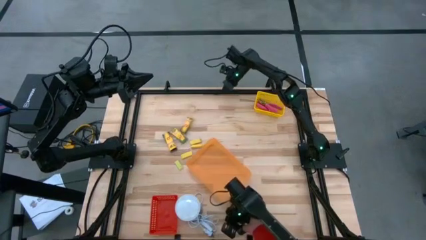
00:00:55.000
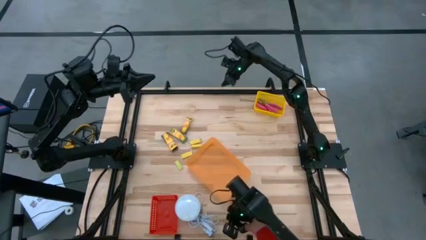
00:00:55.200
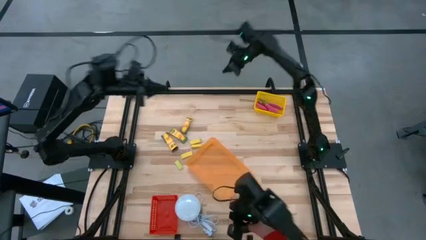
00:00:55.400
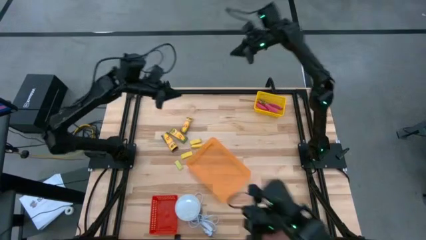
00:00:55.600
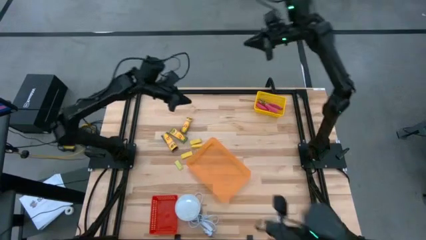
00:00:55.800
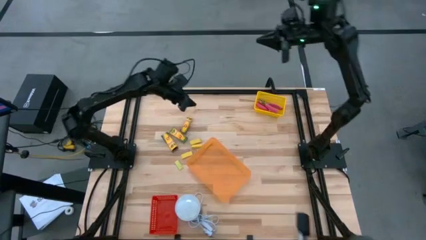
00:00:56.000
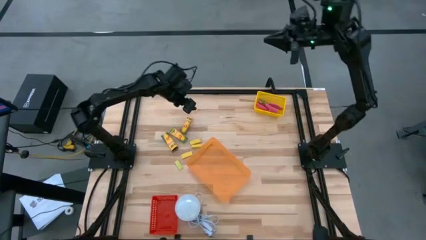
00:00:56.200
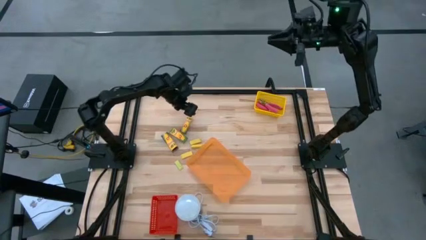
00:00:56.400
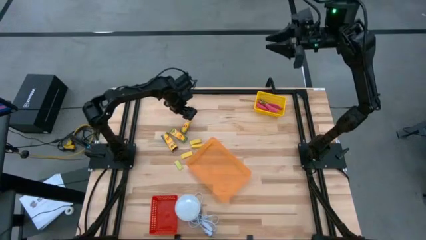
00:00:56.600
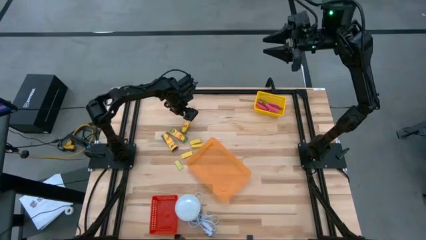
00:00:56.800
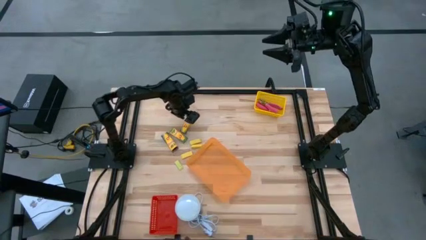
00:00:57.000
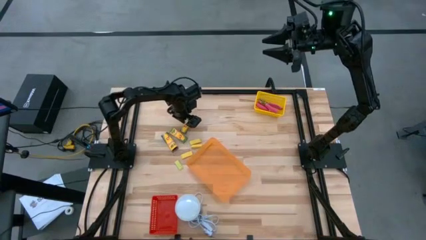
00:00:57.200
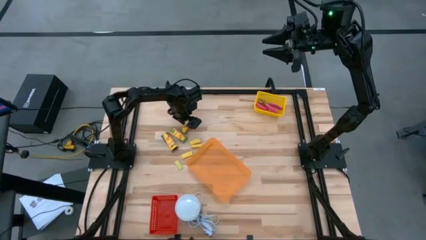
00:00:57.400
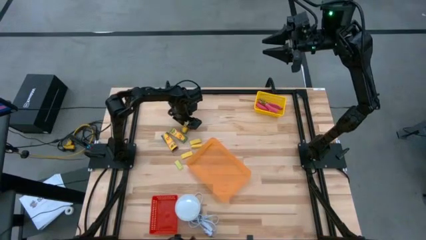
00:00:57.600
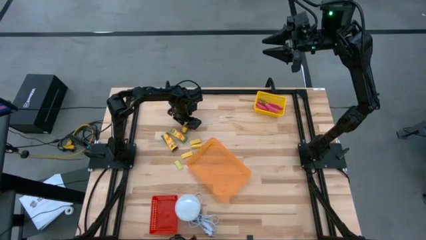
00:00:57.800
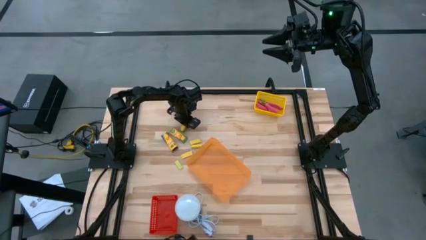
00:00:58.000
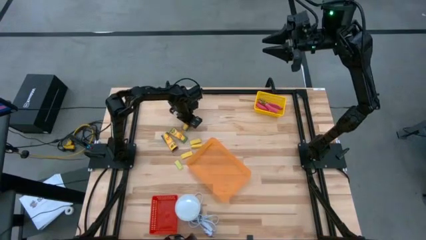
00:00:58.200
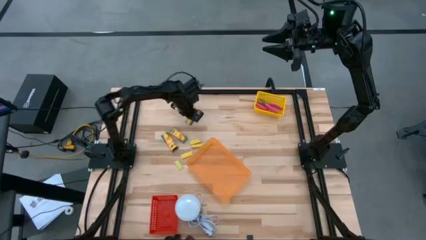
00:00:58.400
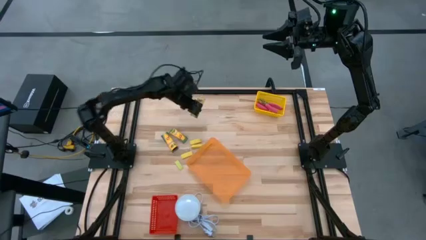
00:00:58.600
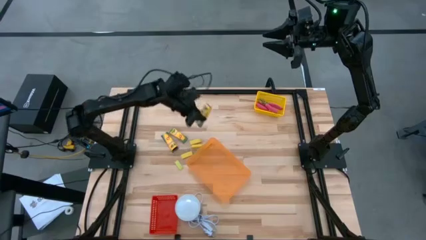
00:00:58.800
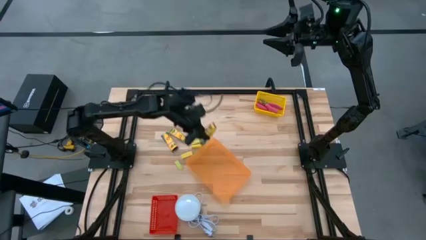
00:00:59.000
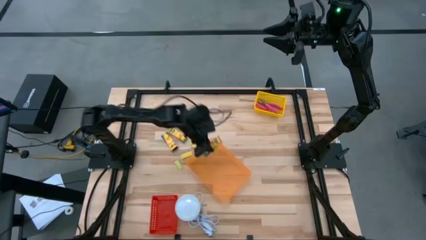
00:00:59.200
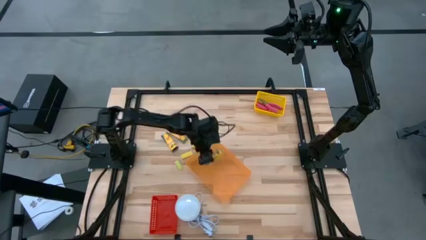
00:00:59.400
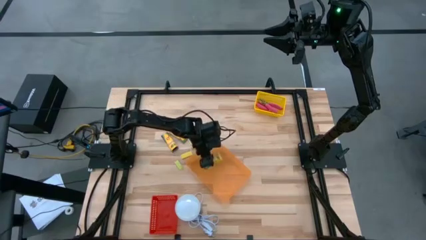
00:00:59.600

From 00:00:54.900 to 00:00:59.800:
Task: Pick & Place School Supplies
Put the crayon pack into the orange bin

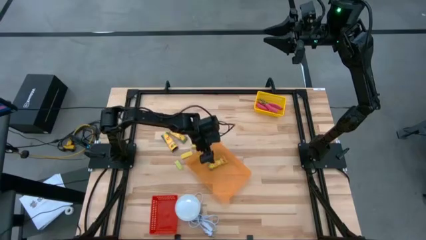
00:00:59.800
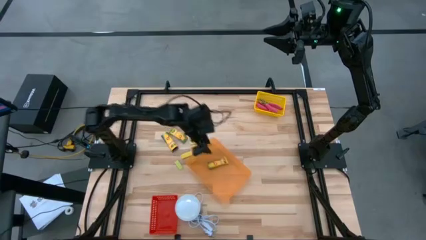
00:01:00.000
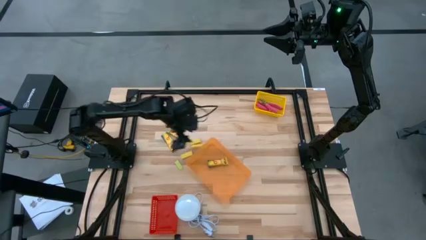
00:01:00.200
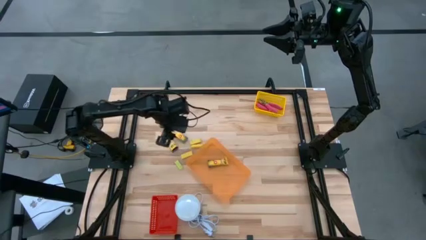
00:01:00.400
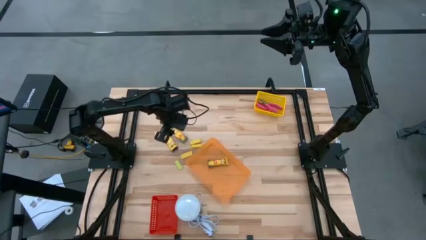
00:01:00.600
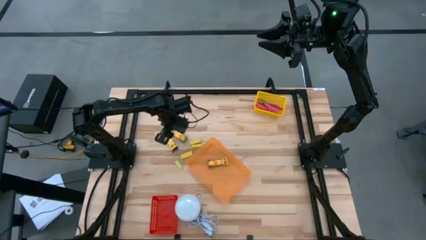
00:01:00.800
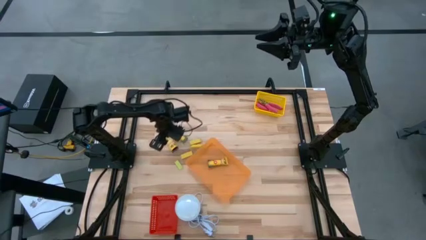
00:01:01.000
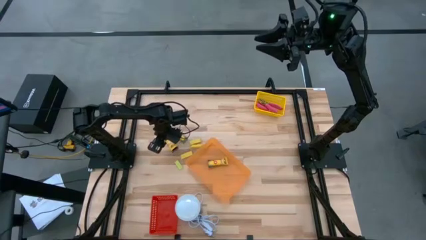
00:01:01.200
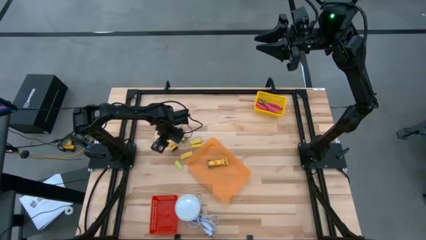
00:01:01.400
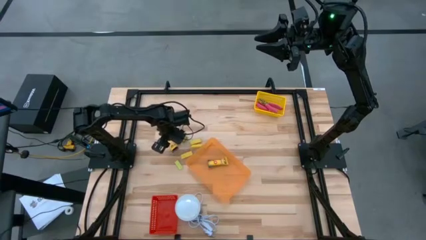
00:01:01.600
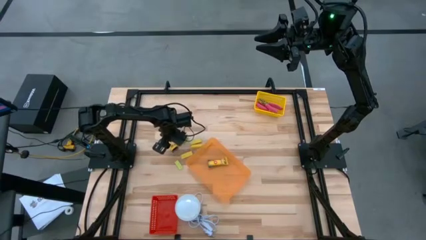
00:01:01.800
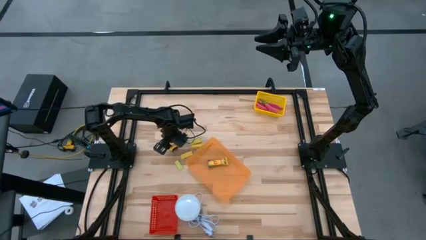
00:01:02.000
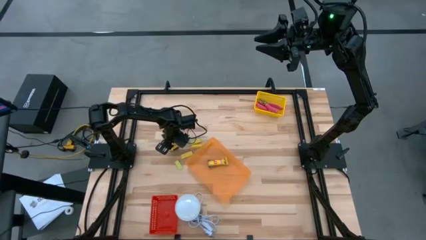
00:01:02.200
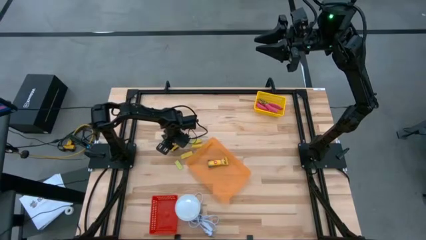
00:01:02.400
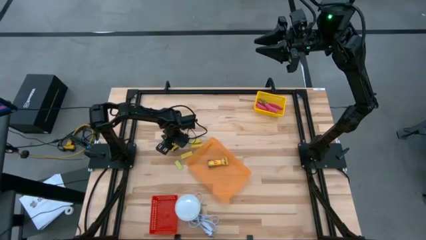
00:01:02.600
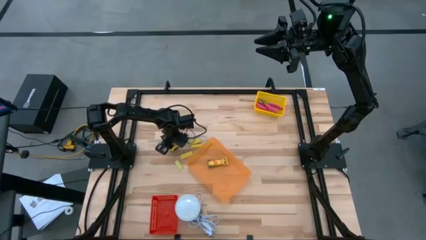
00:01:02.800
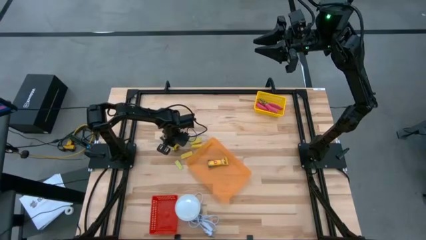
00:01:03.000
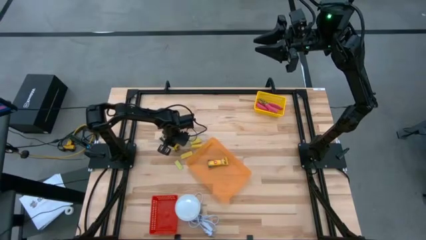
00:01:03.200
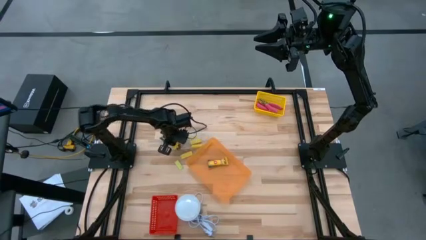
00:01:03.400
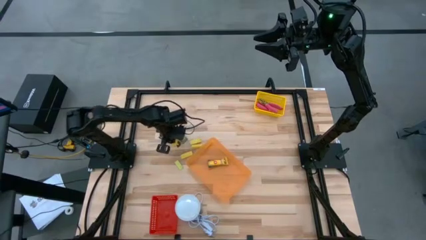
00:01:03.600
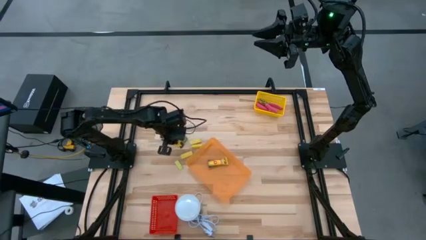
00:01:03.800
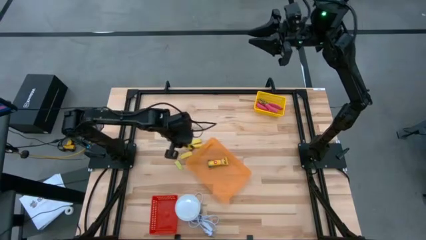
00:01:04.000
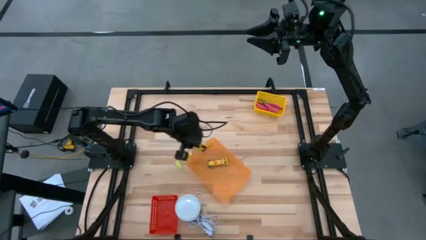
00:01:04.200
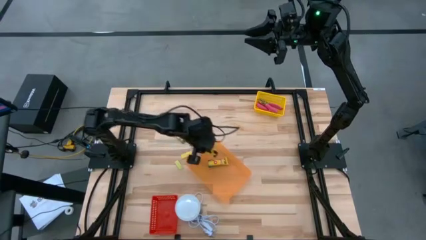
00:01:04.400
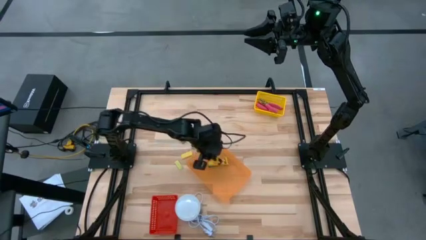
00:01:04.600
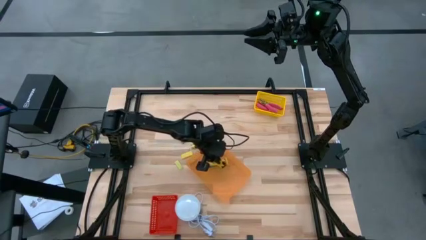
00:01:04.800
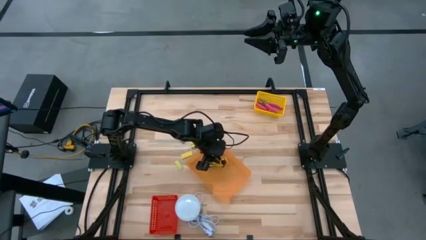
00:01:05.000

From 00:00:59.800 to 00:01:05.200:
Put the crayon pack into the orange bin

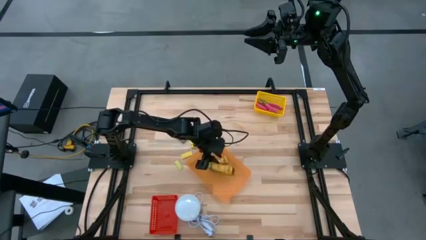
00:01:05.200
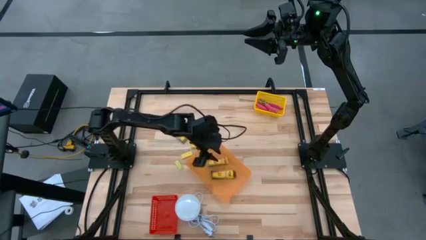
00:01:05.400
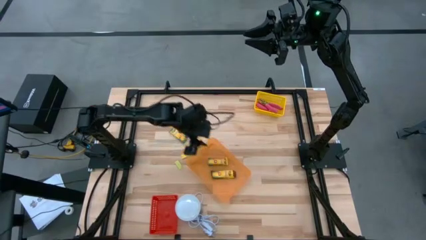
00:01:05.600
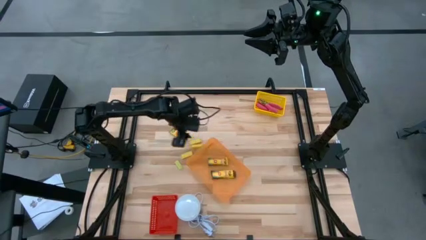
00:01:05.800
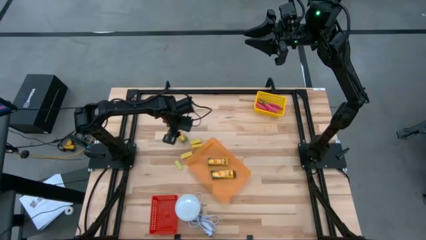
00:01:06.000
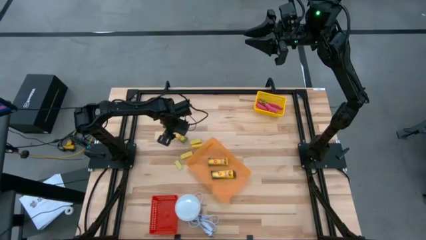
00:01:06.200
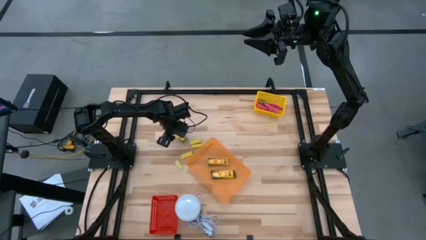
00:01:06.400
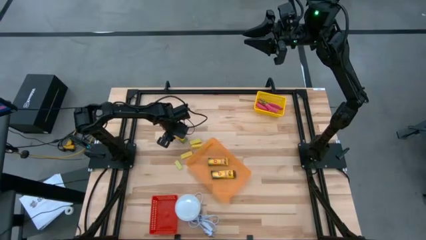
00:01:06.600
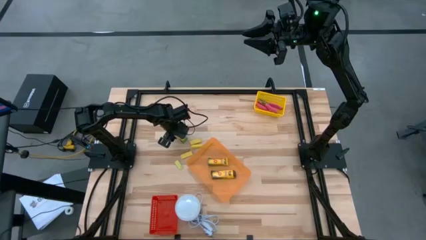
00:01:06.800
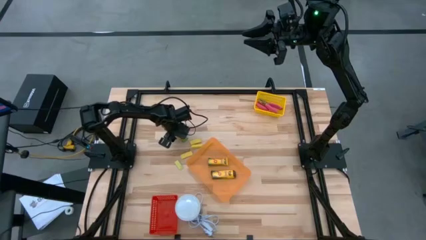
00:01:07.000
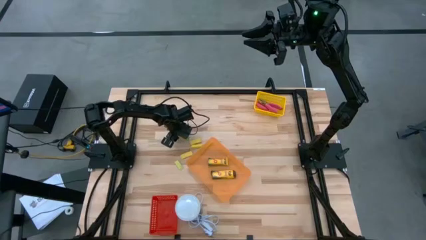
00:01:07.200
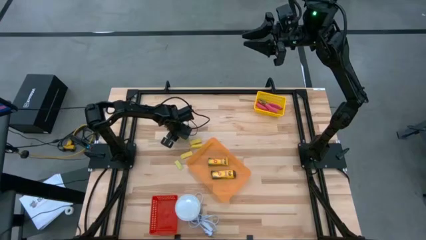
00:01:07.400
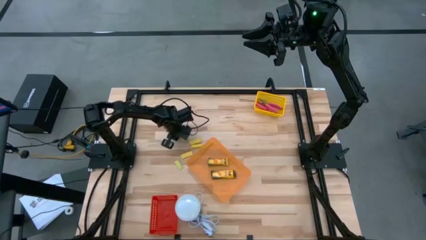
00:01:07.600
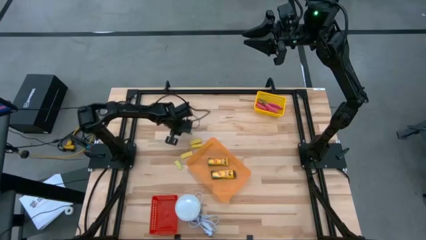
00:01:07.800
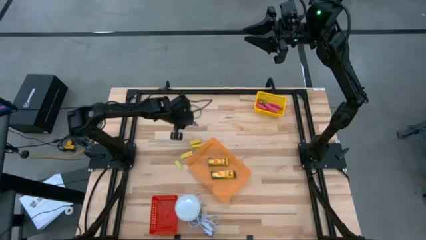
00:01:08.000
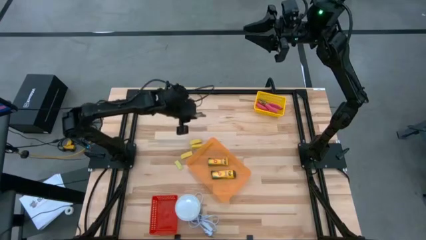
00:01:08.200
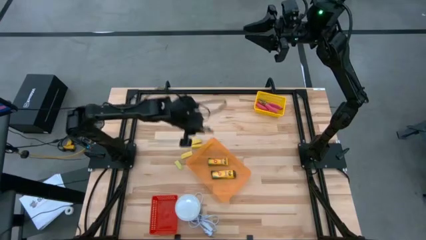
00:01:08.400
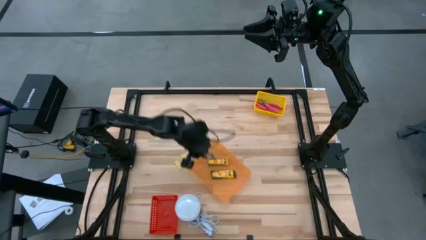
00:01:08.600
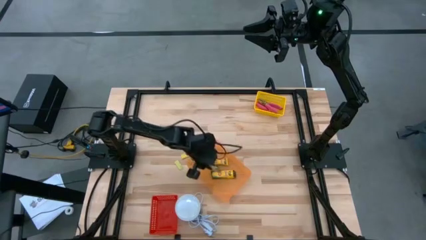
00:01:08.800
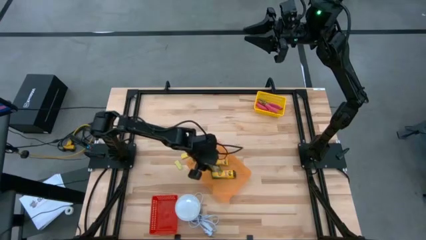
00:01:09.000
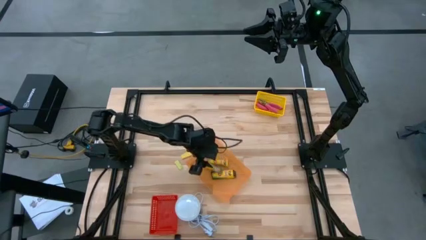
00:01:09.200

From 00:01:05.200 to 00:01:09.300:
Put the crayon pack into the orange bin
